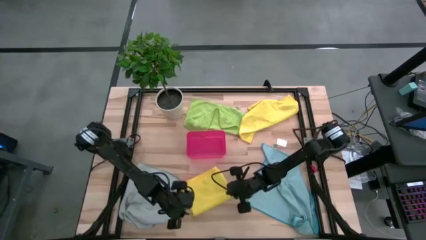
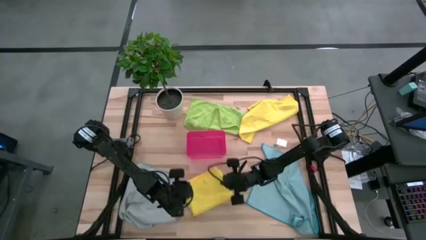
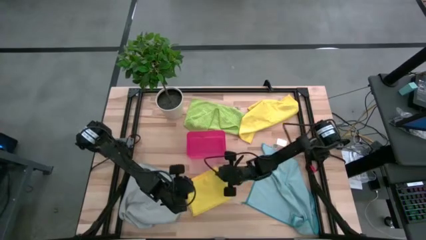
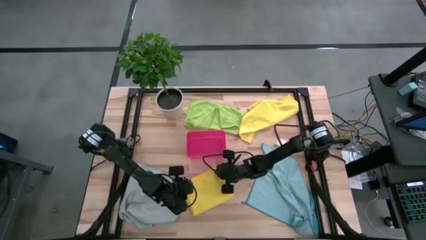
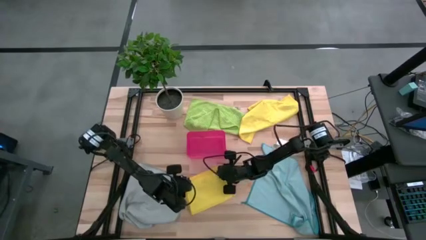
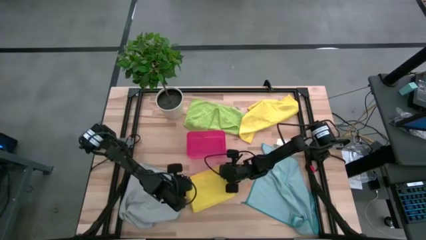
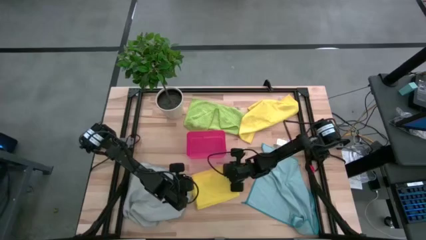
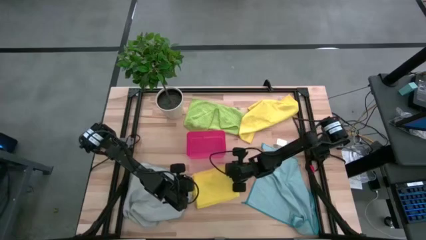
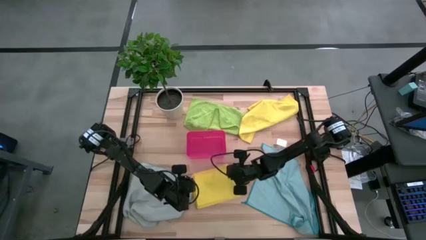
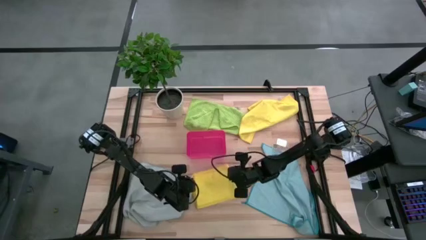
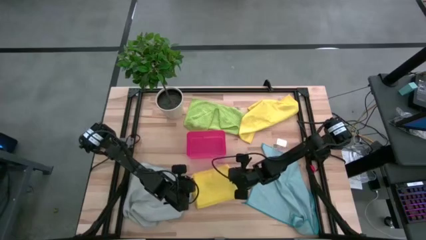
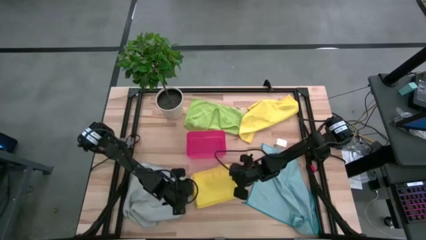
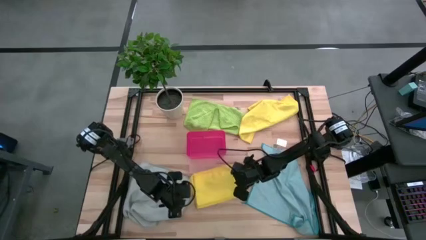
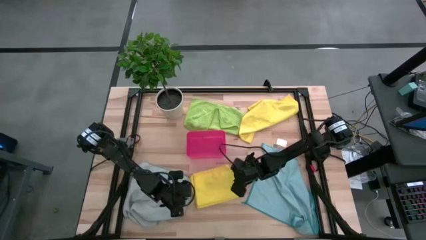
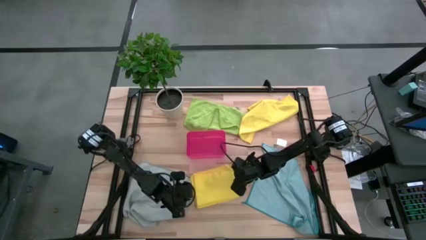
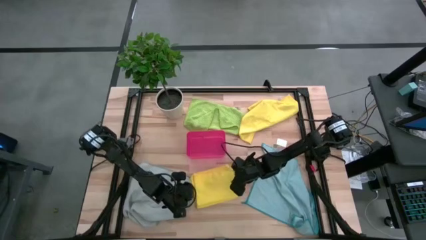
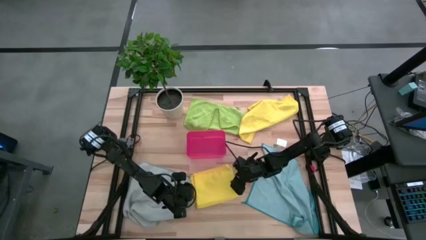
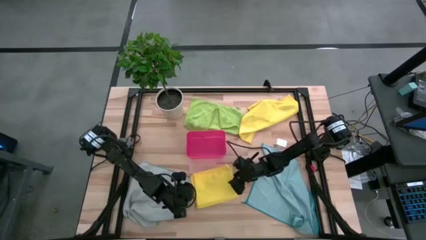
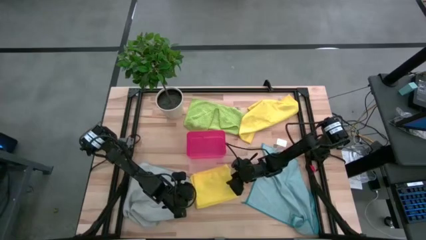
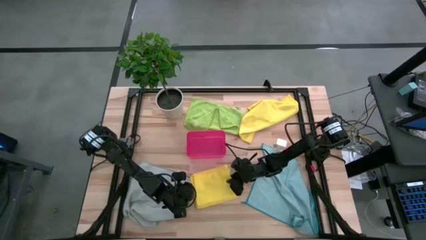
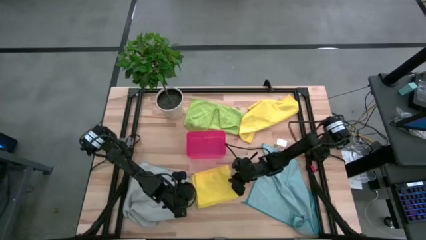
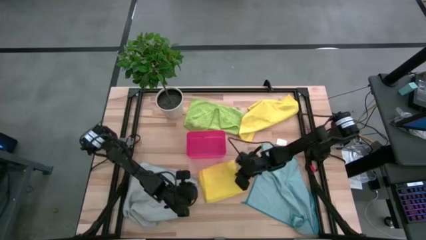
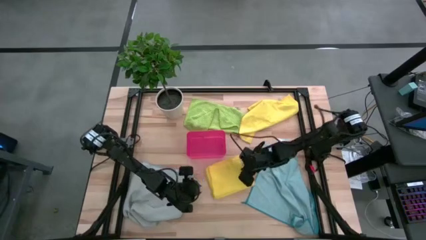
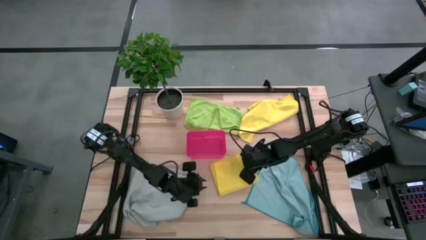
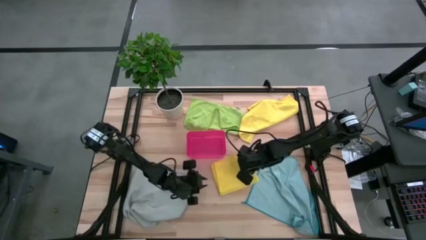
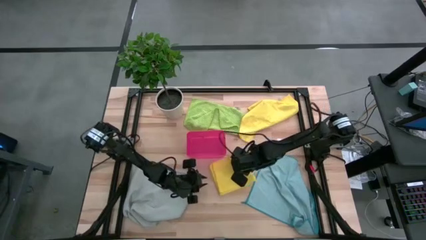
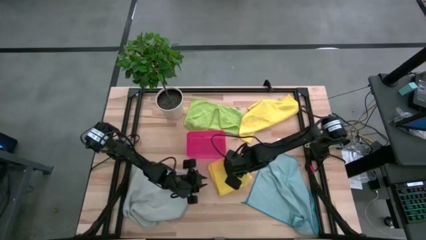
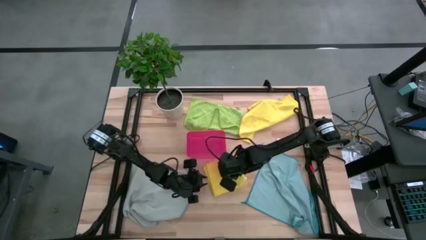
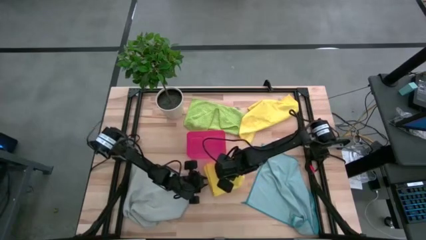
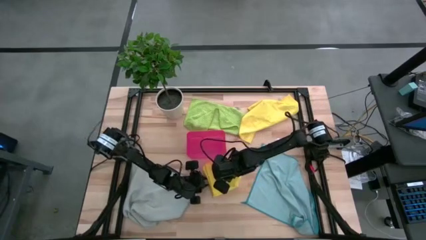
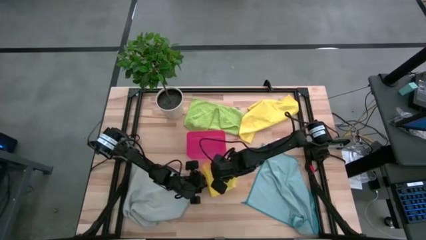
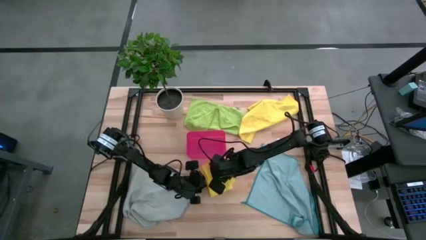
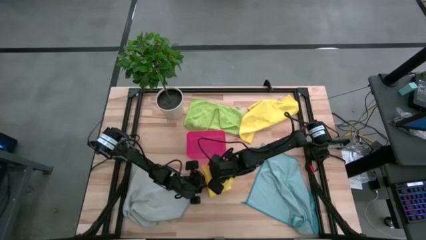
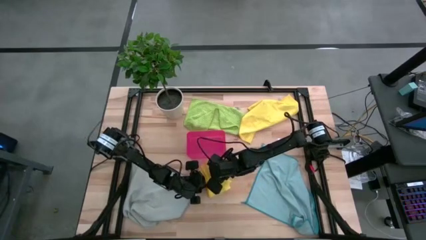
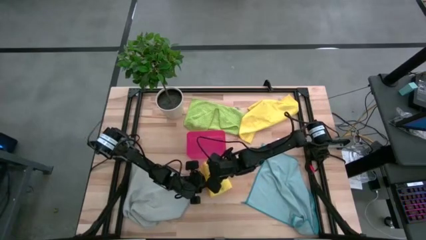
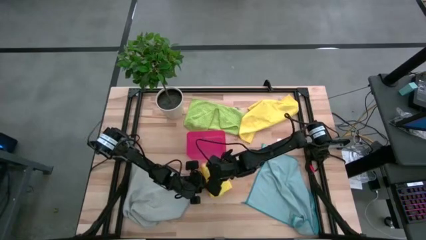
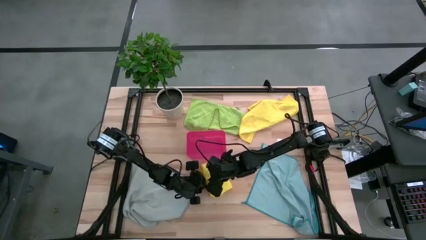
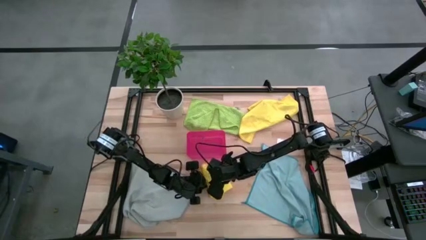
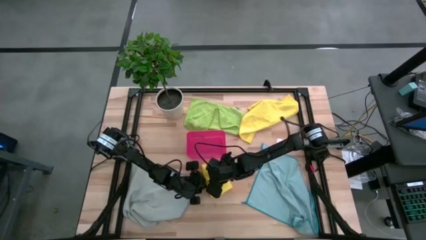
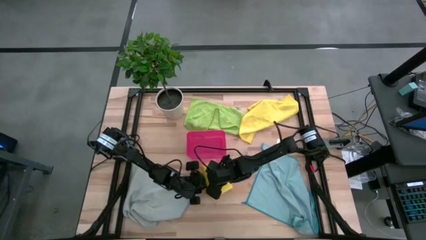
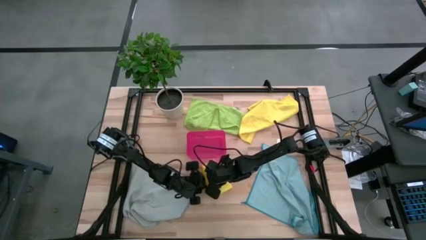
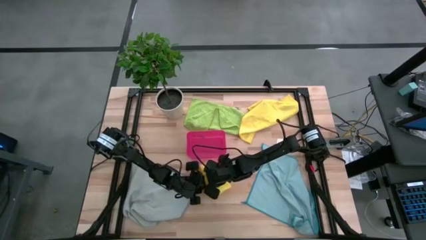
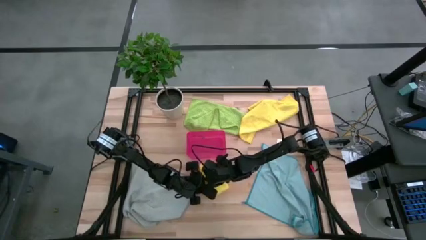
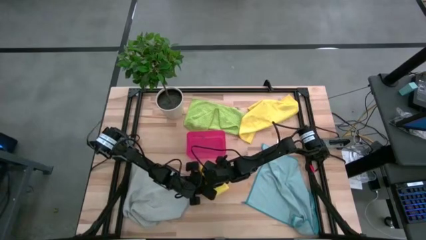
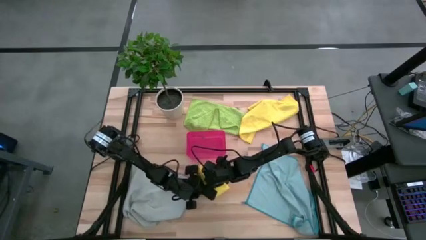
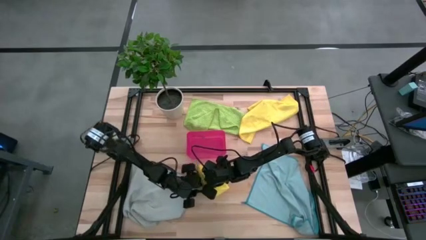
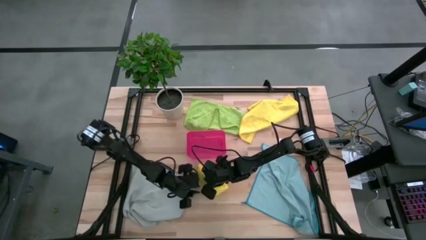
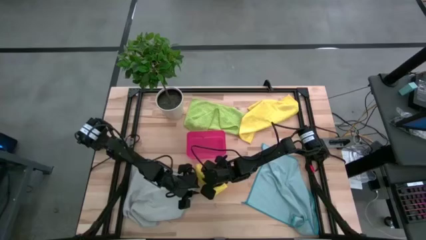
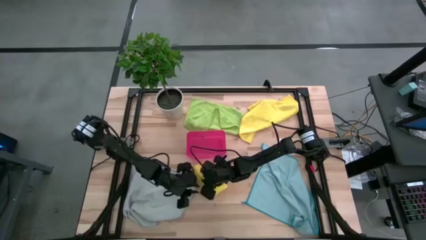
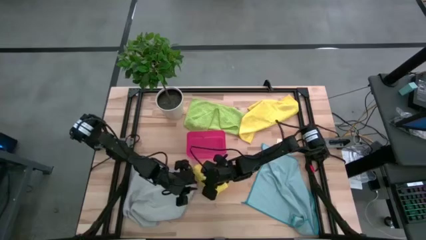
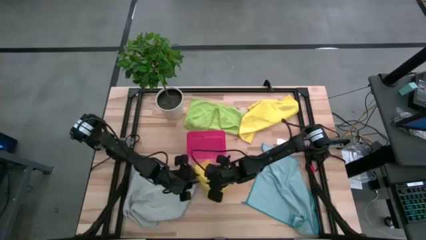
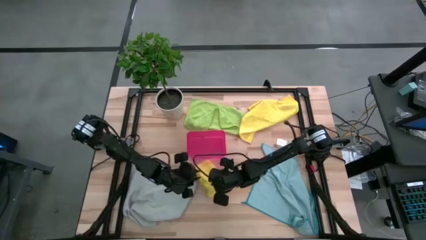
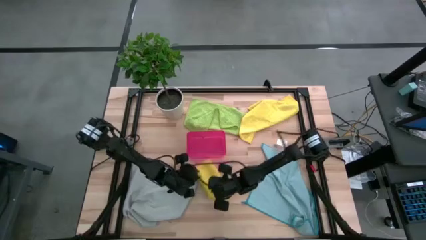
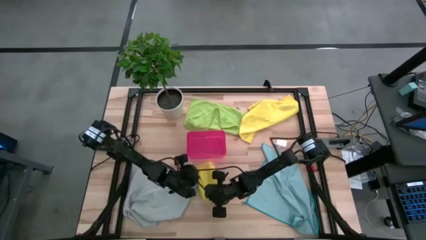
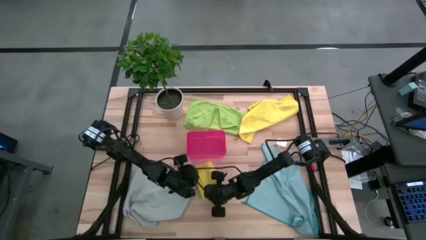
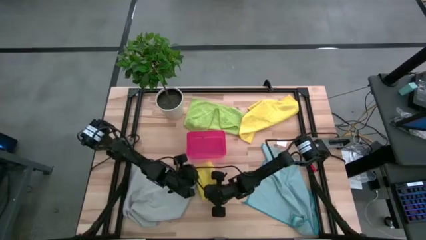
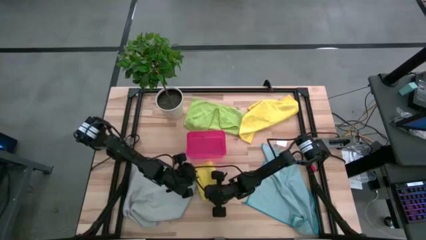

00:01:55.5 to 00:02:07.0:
Task: Fold microfiber towels
Fold the bottom yellow microfiber cloth

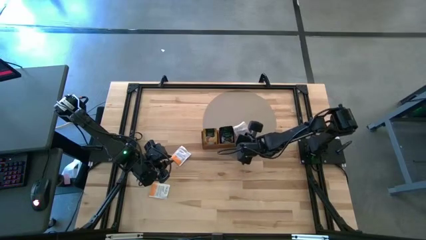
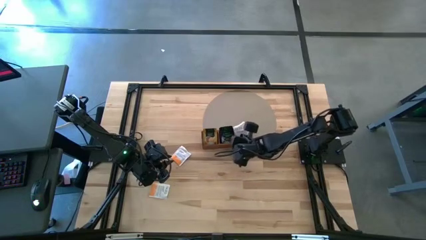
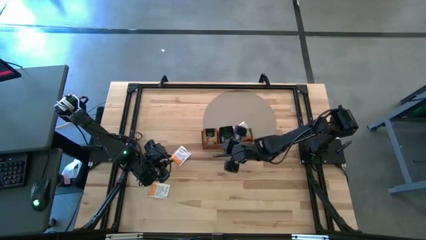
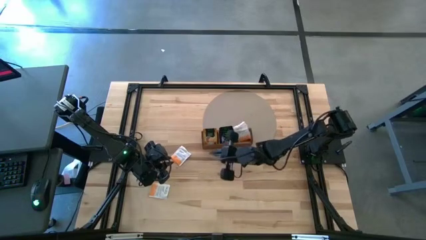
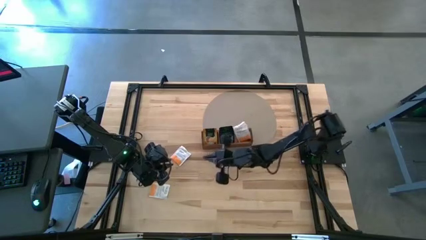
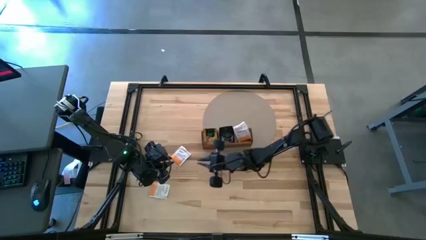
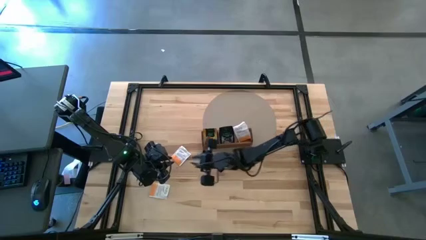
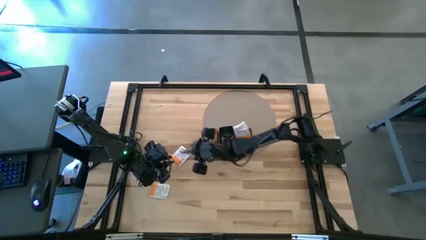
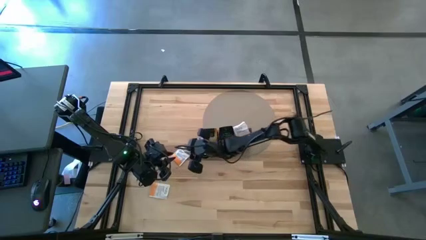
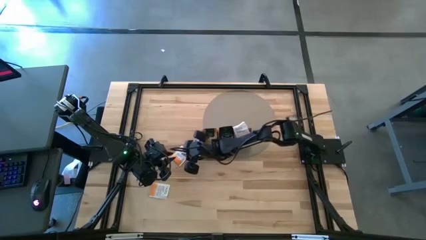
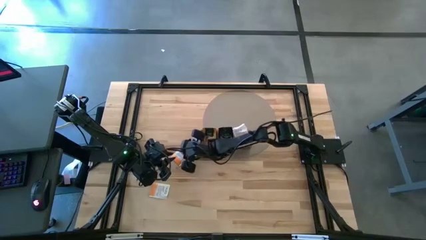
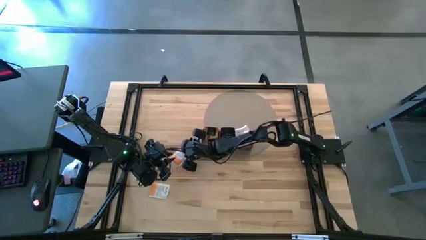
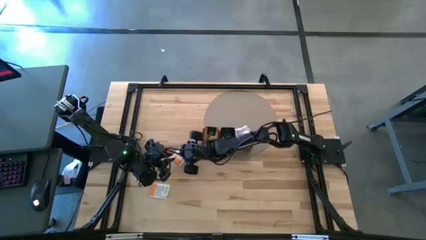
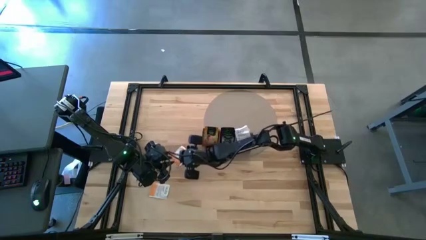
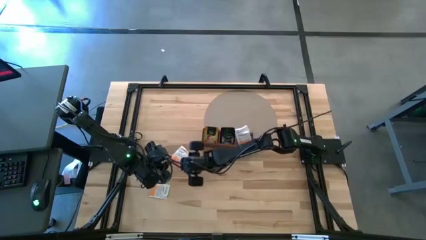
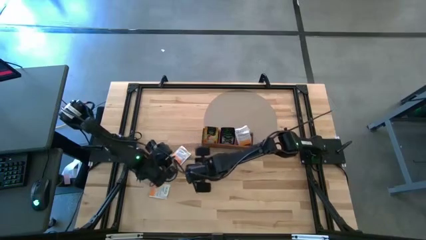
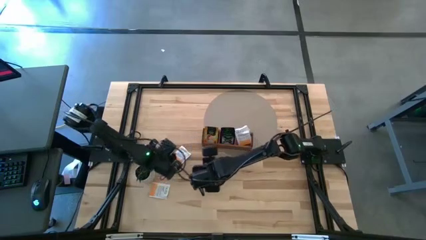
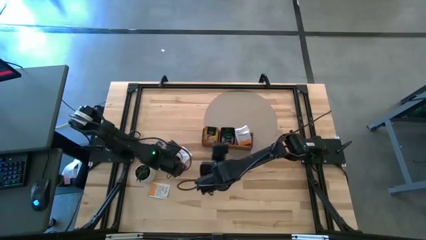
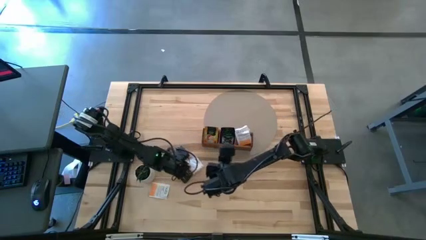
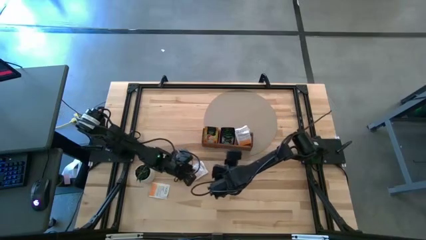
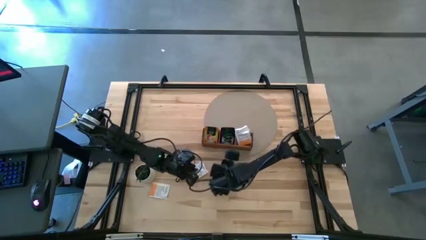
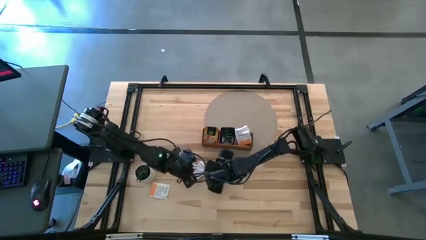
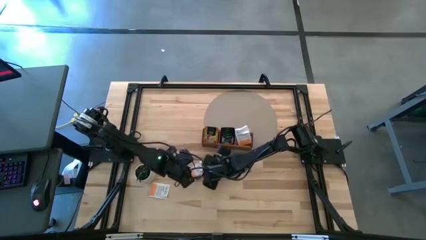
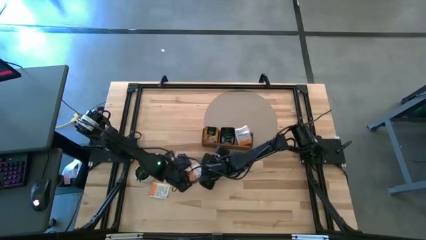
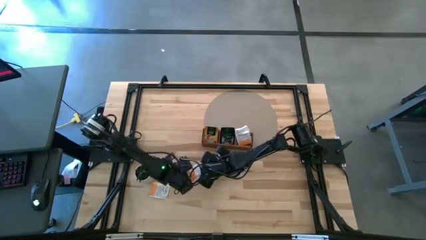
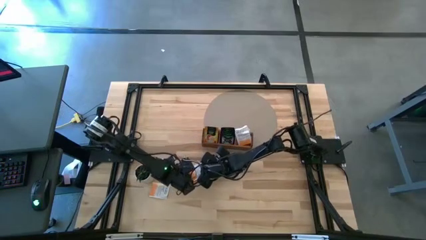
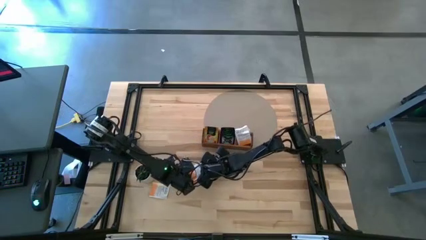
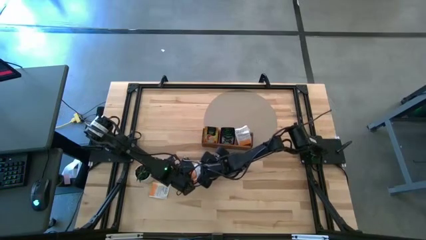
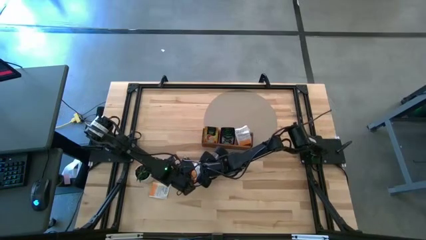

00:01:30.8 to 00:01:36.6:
Task: Pick & Place Tea
Put the white tea bag into the right section of the wooden organizer

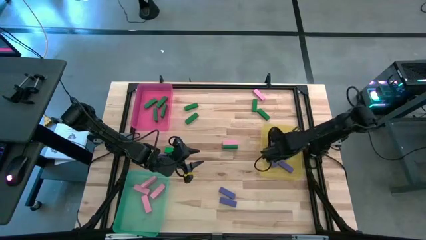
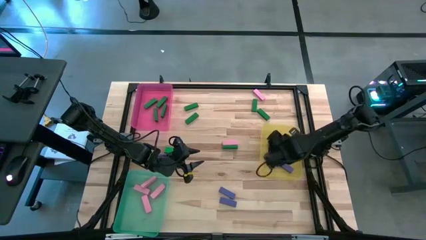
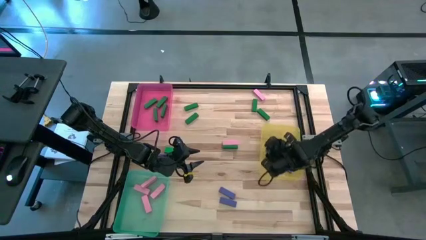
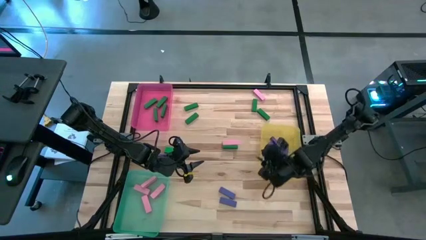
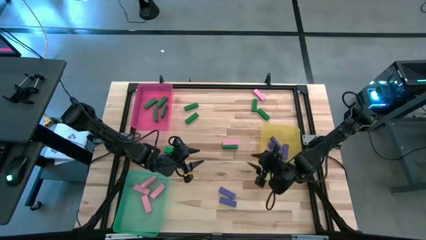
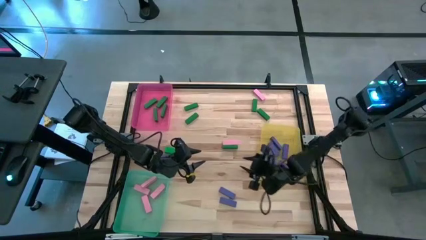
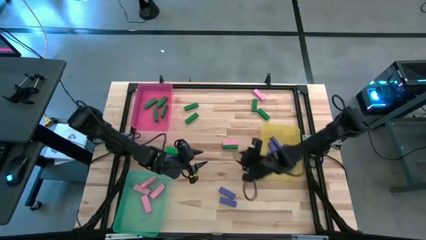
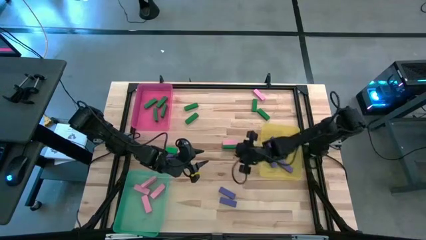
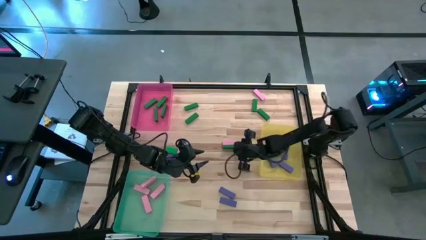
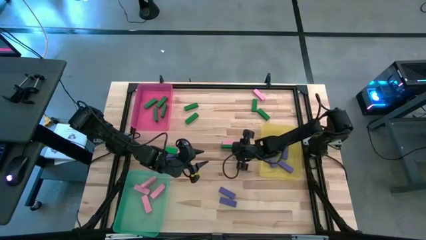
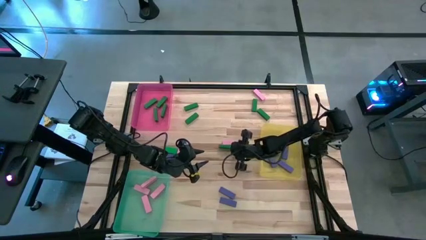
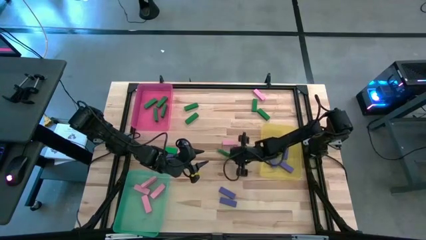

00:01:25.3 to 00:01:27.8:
Task: Sort blocks
Put the green block into the pink bin
